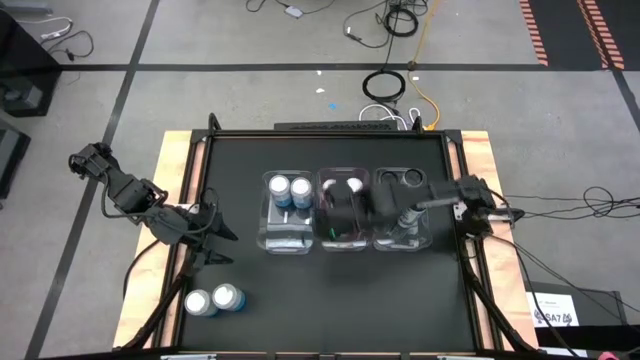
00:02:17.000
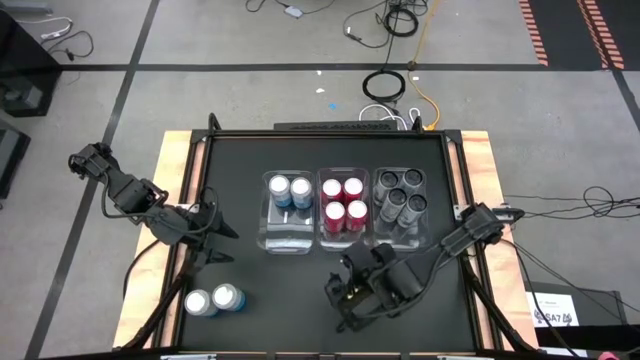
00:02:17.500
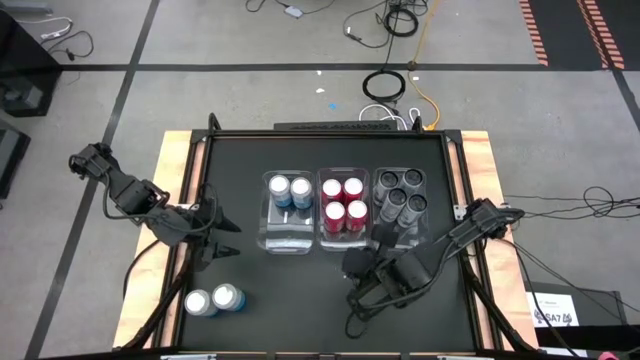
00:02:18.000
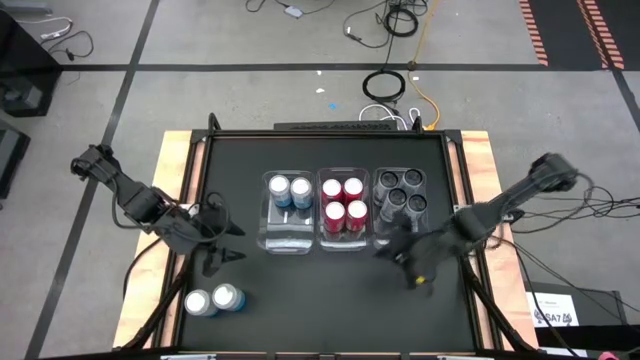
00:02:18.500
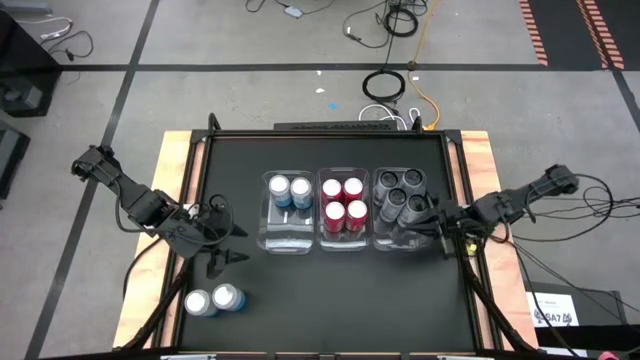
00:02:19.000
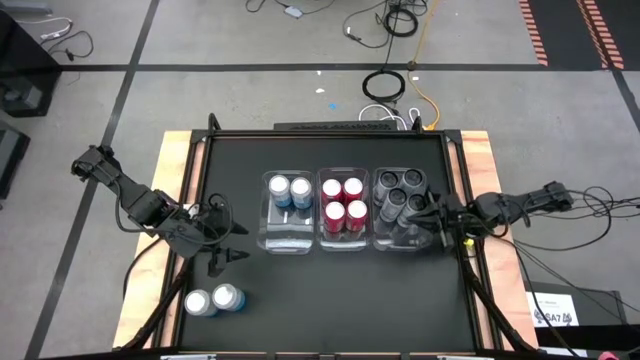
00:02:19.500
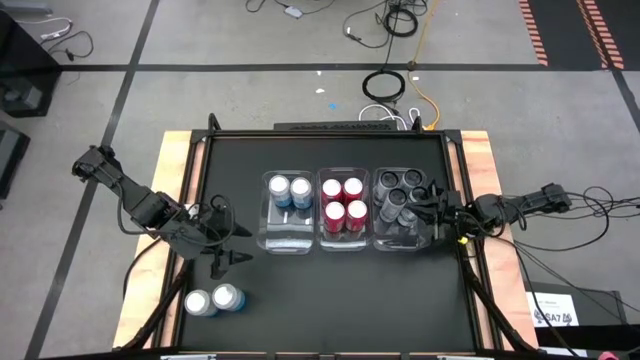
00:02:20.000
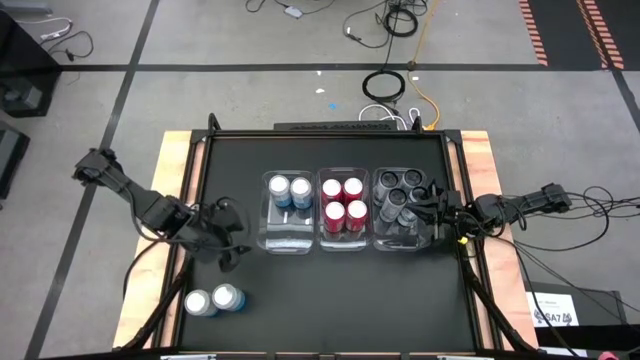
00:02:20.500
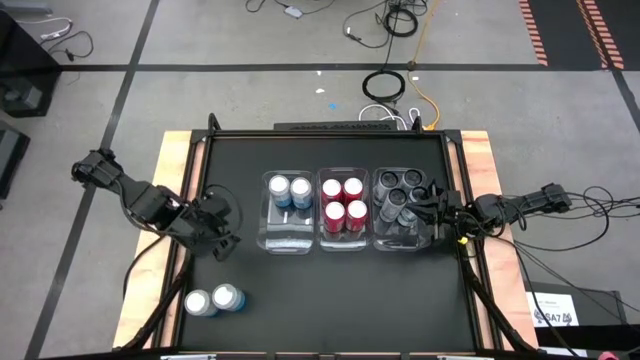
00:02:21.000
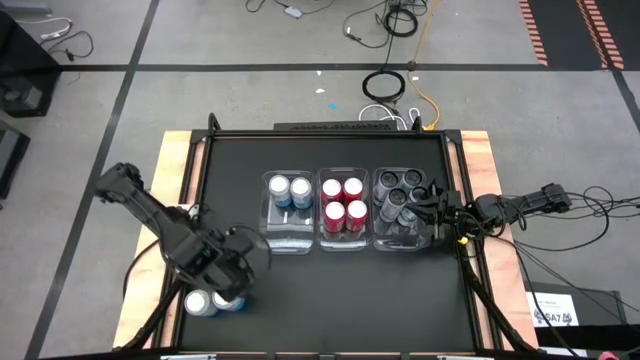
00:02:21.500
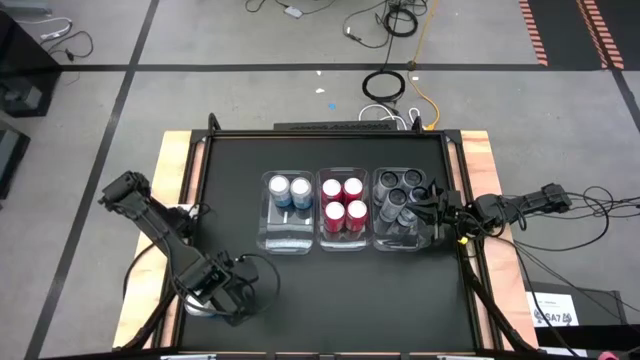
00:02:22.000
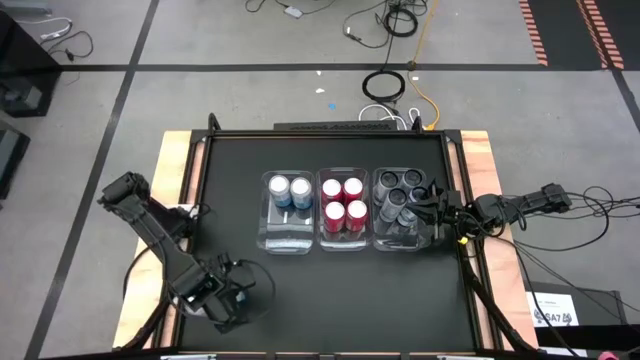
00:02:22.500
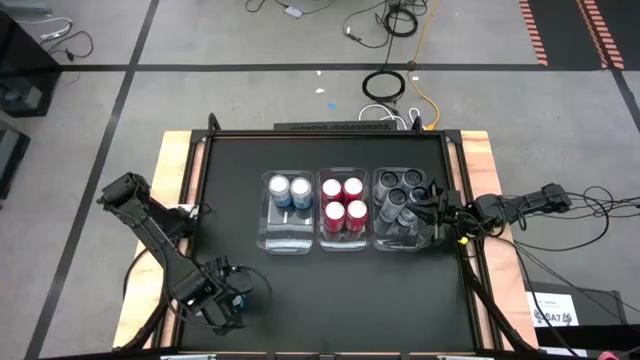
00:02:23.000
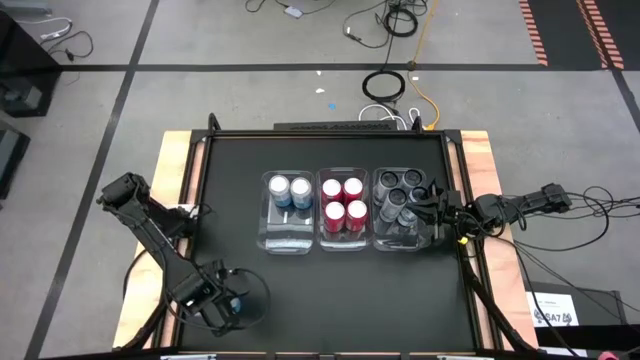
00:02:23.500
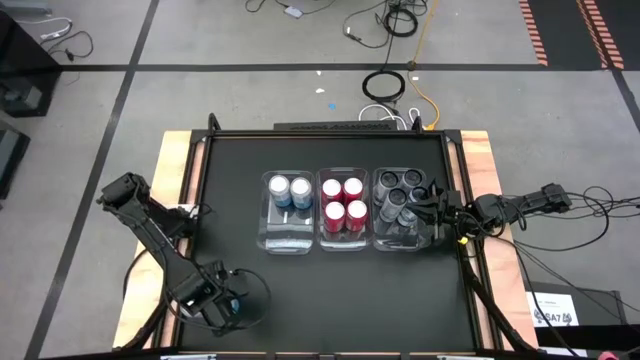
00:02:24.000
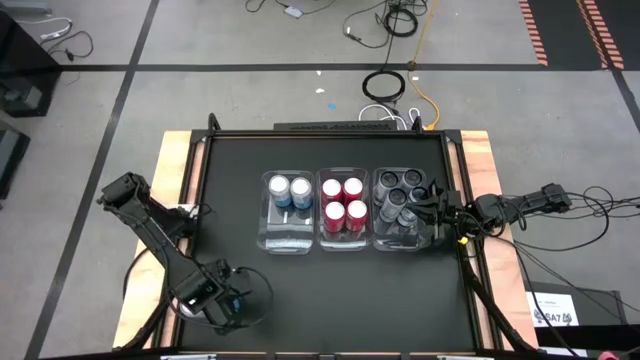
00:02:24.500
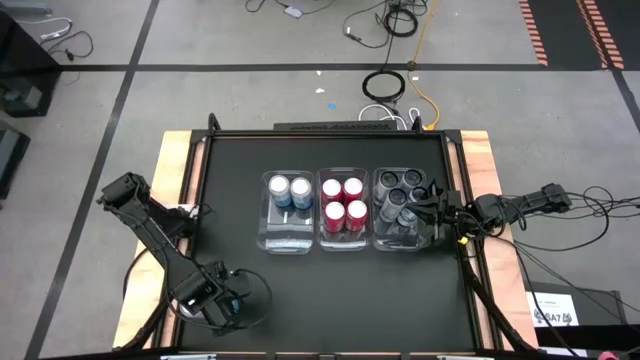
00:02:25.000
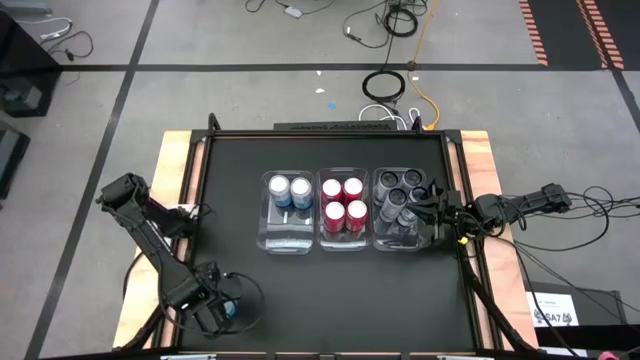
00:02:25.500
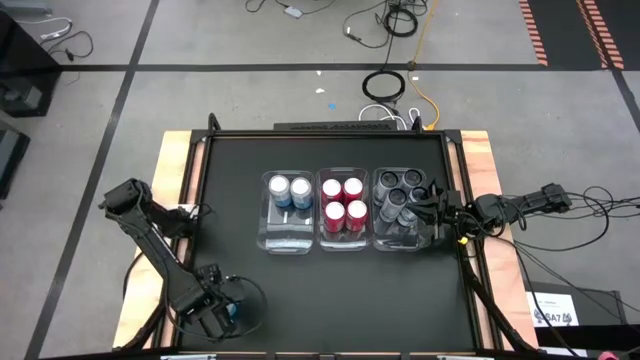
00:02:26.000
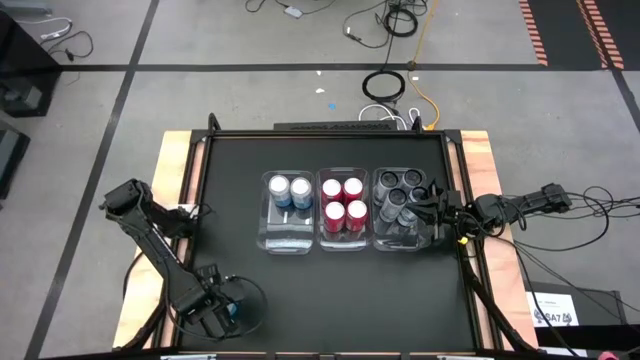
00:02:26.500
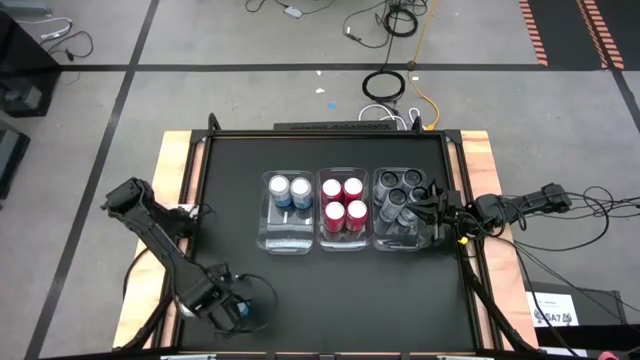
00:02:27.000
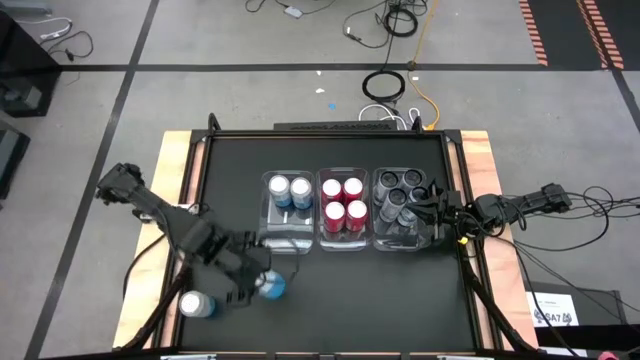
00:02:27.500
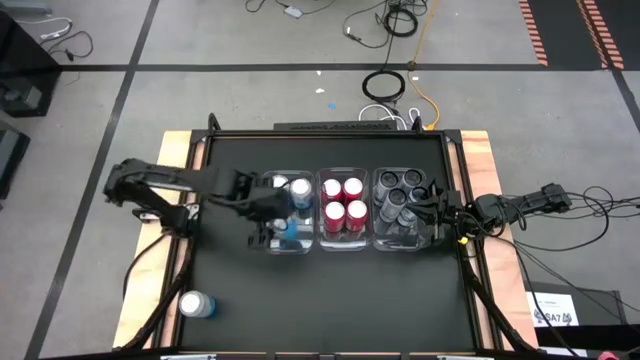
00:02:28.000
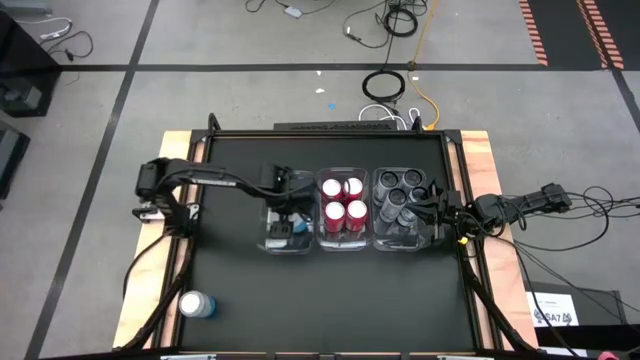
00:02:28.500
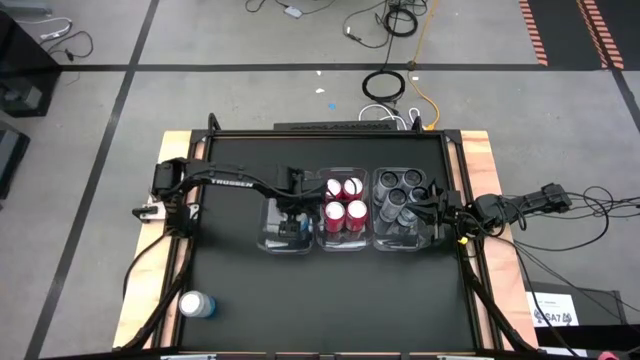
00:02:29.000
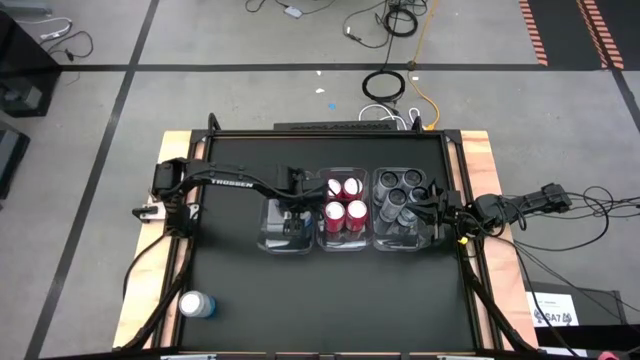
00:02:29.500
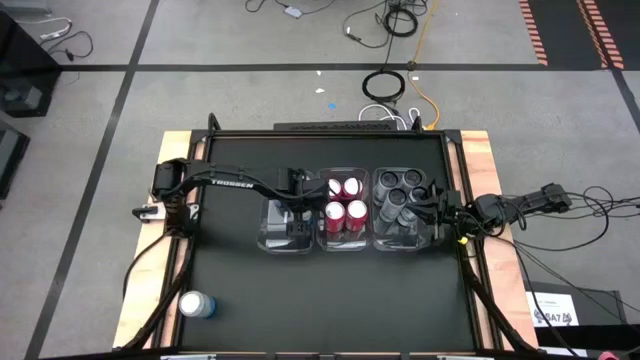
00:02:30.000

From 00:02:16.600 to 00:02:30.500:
Task: Sort soda cans
Put the blue-white soda can into the left transparent bin

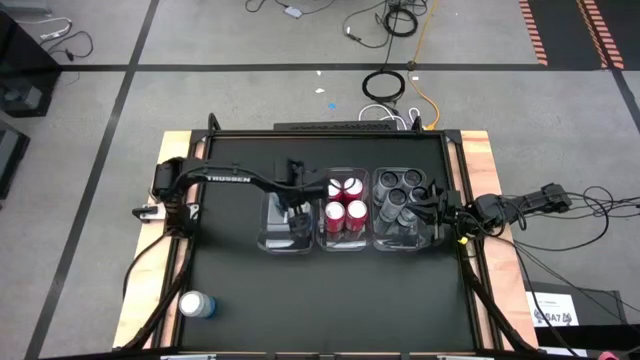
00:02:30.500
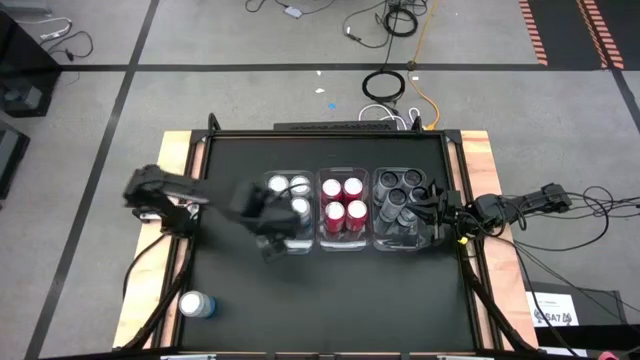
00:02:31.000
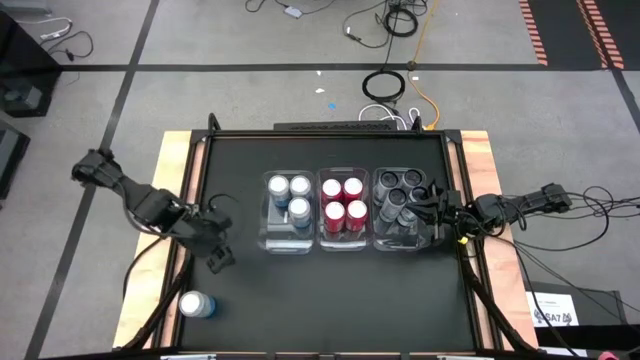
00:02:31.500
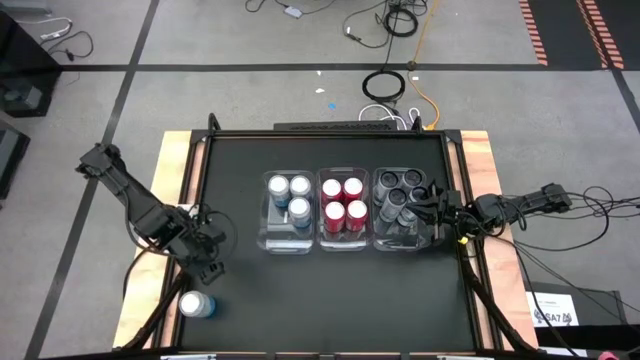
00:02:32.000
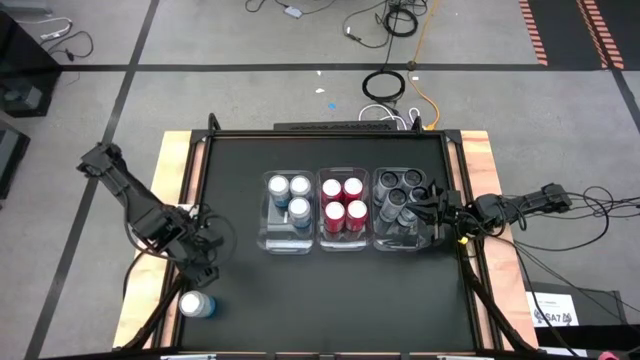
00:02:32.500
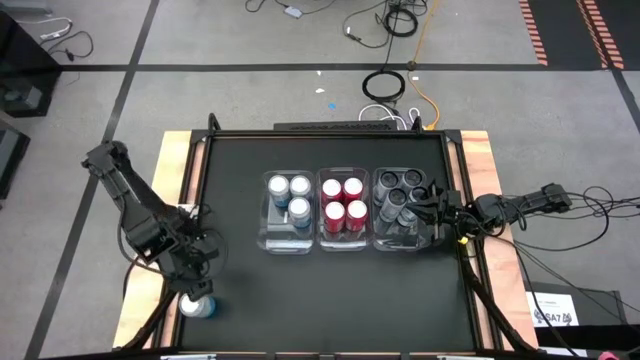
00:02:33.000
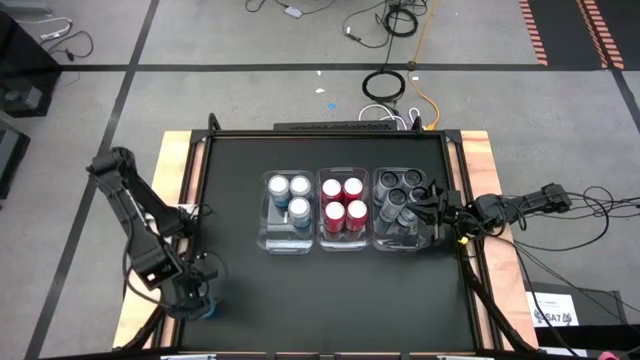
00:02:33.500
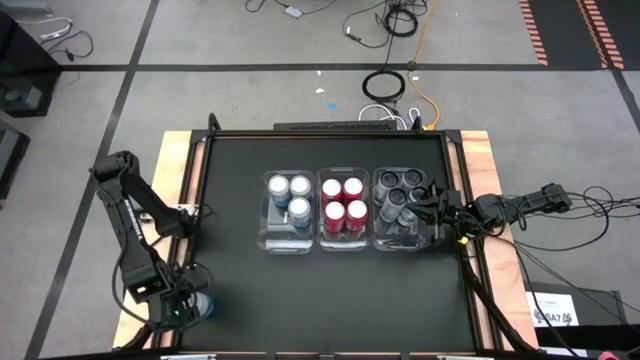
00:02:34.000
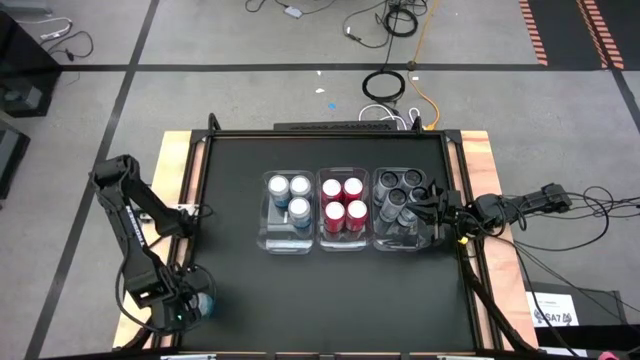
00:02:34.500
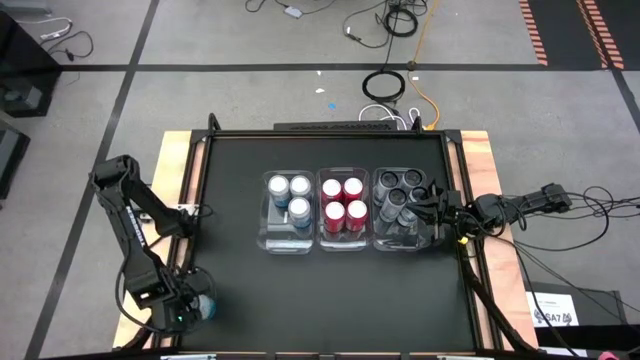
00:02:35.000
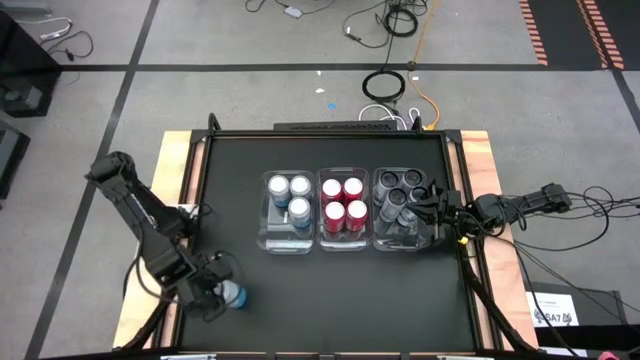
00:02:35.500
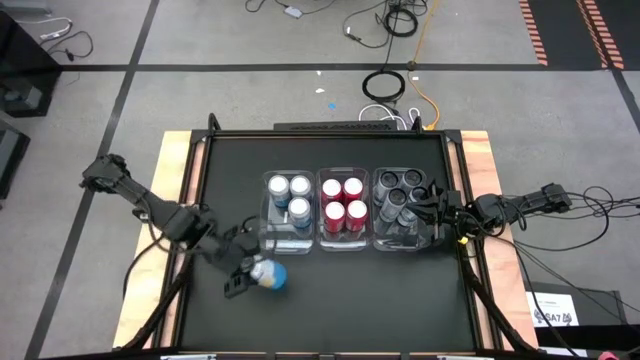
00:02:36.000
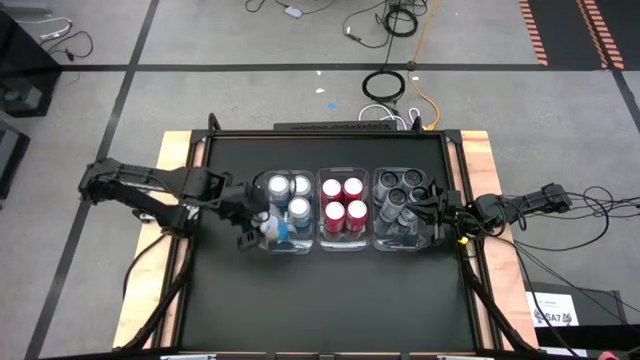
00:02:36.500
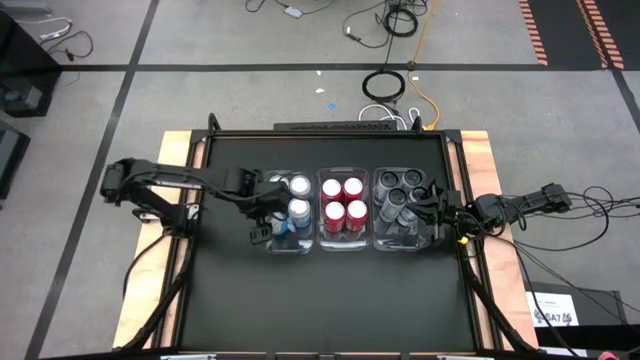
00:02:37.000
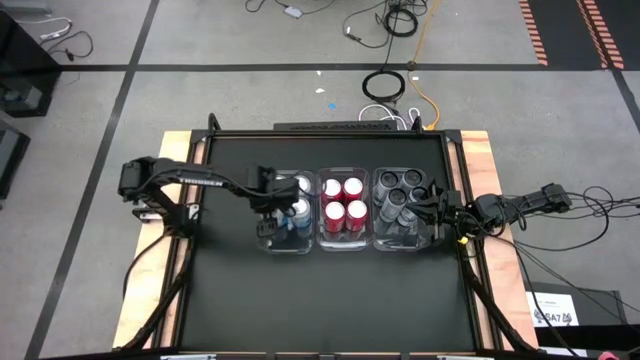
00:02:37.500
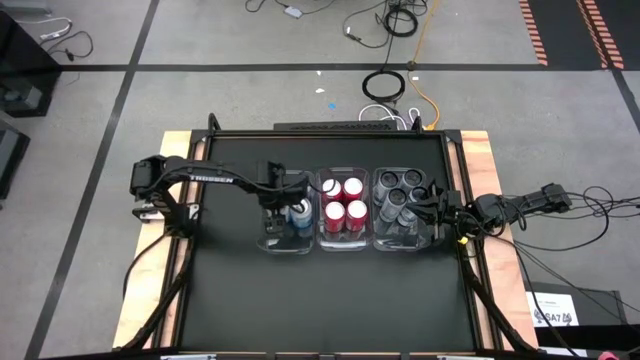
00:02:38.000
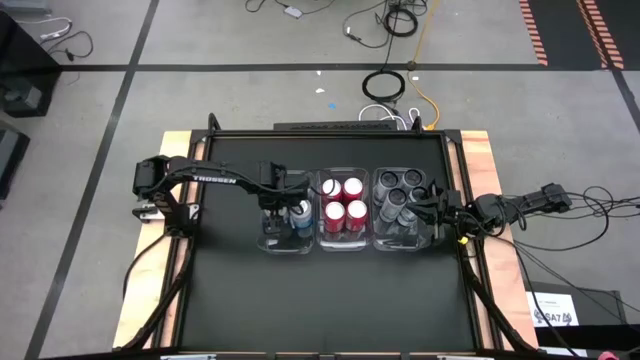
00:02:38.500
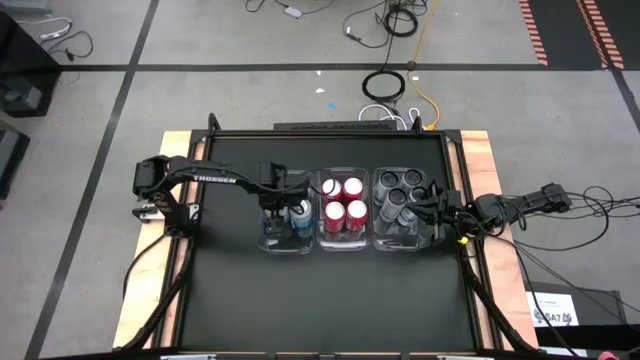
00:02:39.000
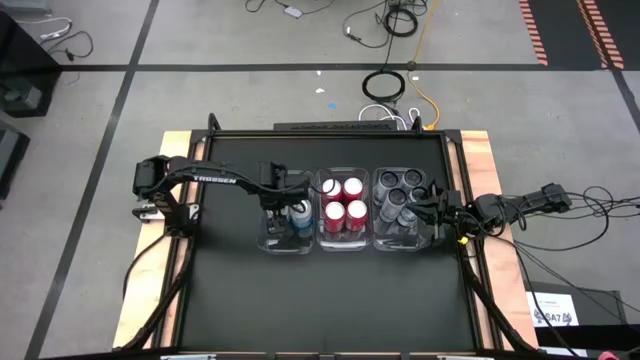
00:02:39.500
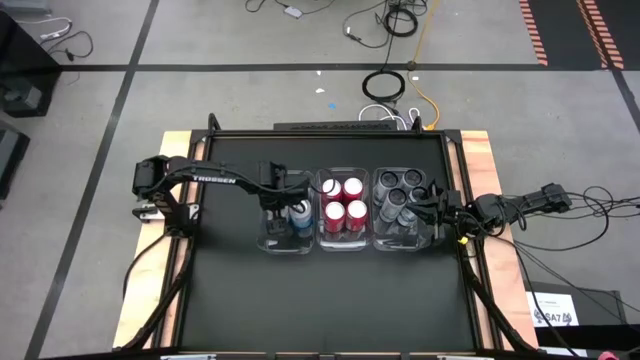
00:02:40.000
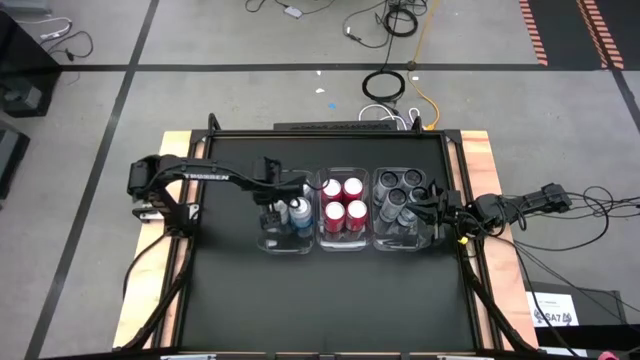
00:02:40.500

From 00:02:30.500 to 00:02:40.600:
Put the blue-white soda can into the left transparent bin
